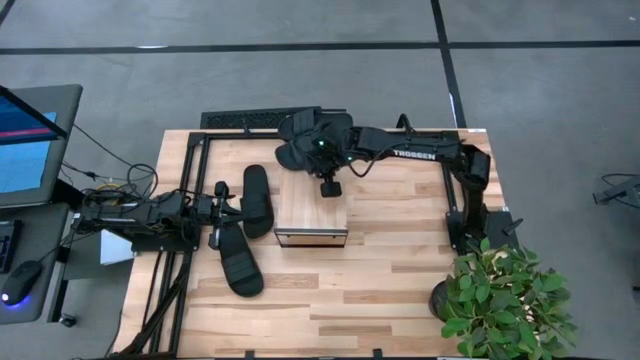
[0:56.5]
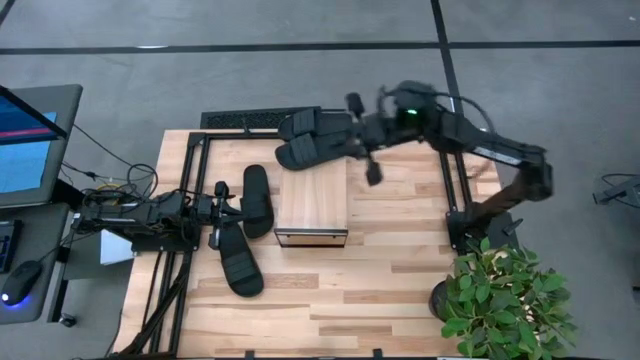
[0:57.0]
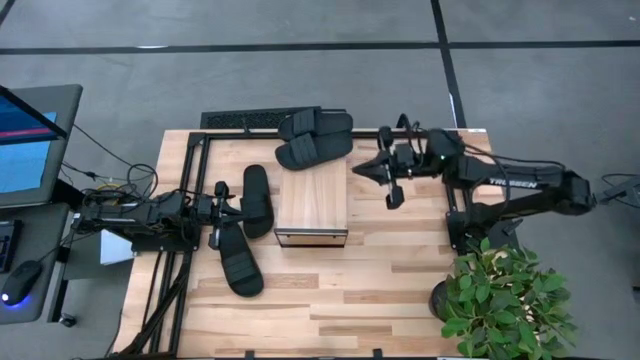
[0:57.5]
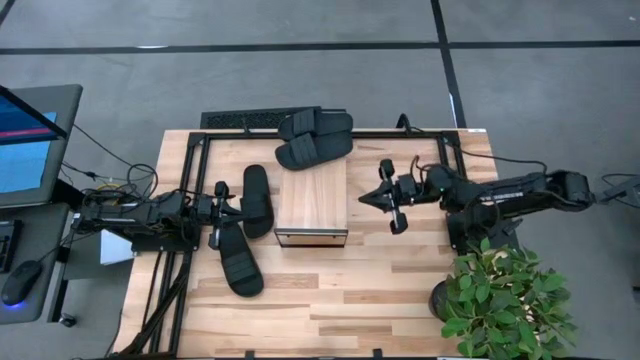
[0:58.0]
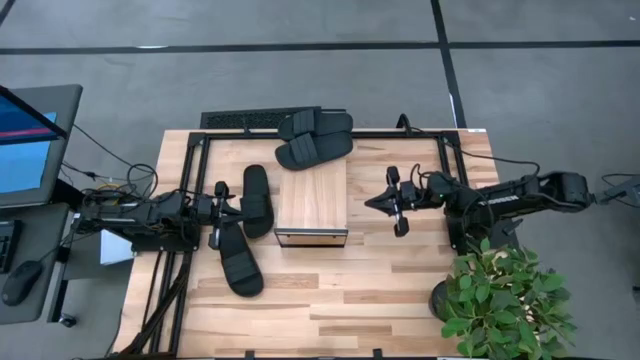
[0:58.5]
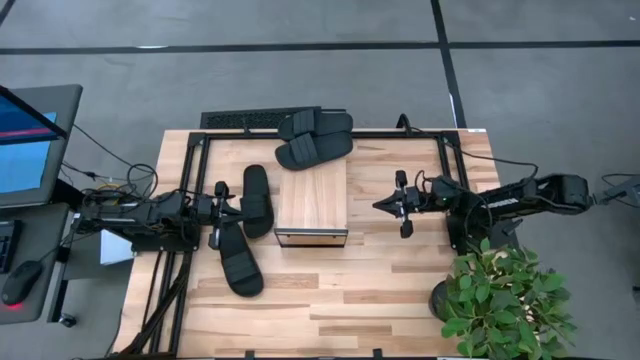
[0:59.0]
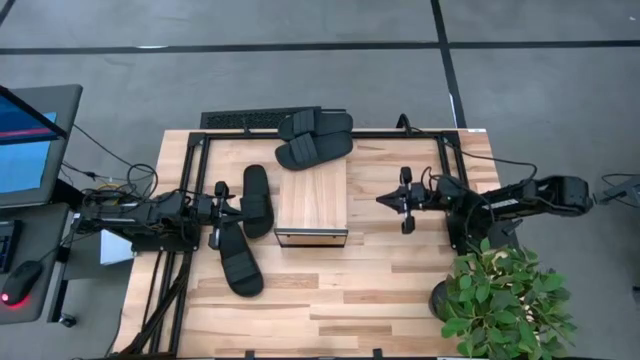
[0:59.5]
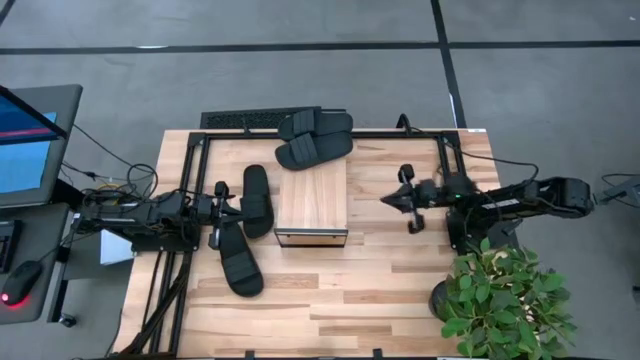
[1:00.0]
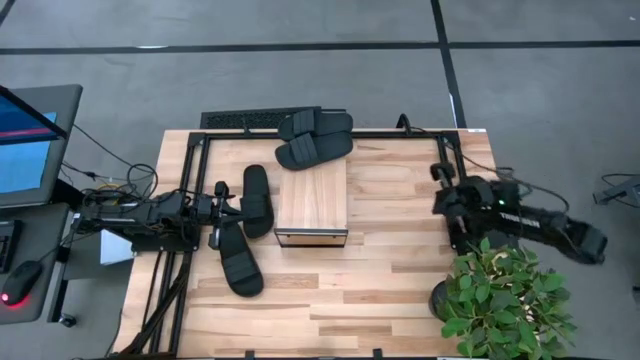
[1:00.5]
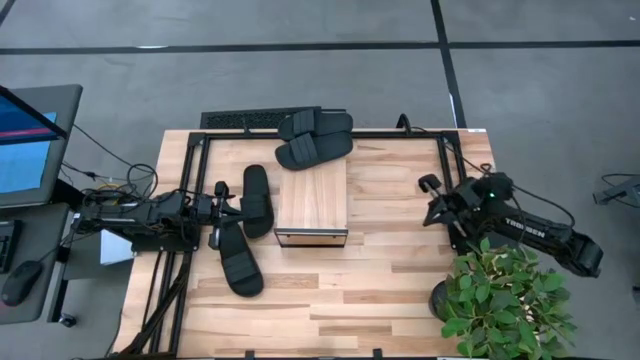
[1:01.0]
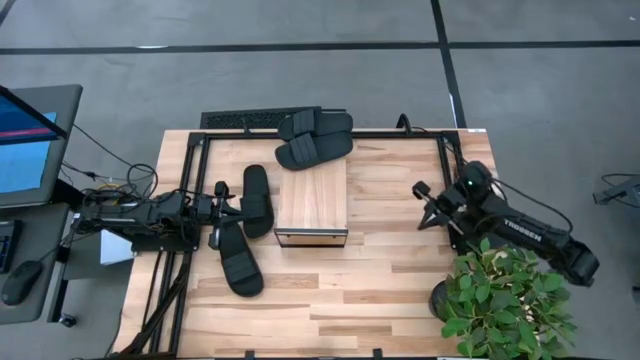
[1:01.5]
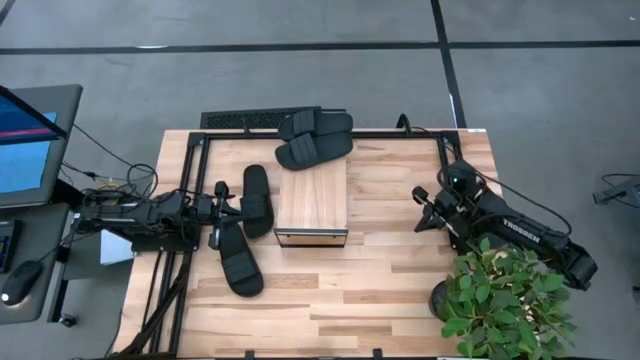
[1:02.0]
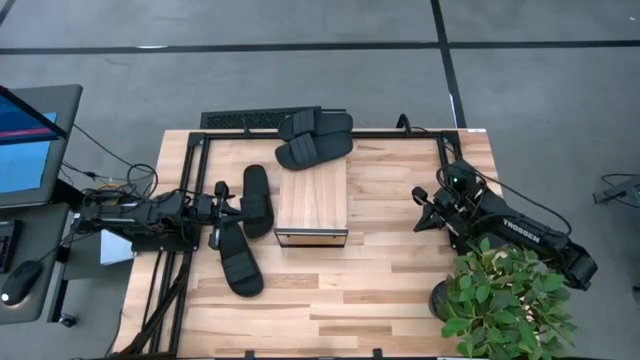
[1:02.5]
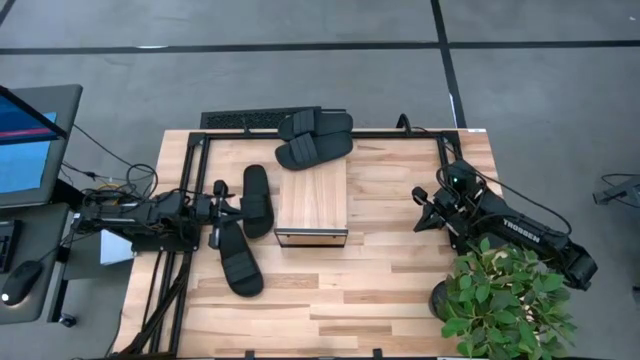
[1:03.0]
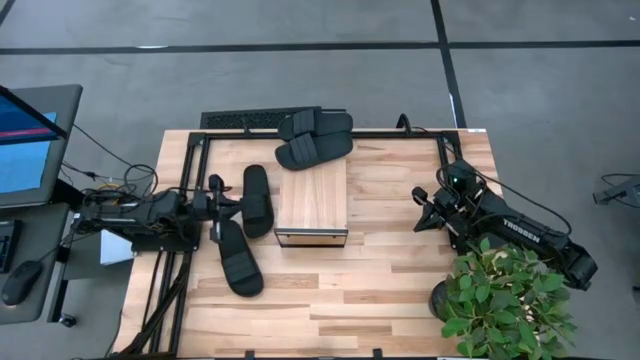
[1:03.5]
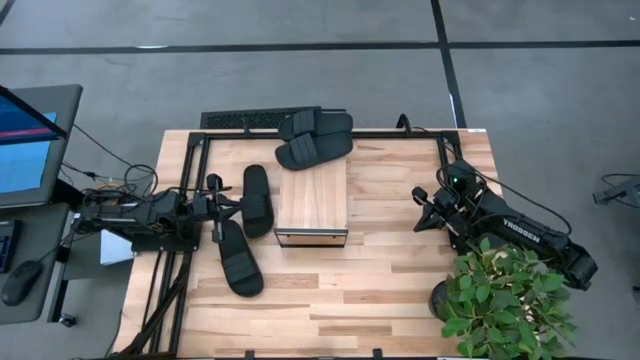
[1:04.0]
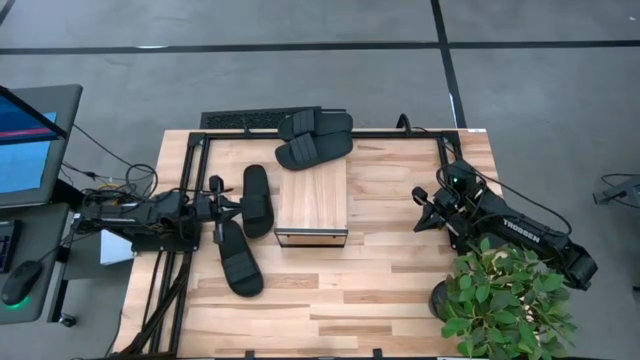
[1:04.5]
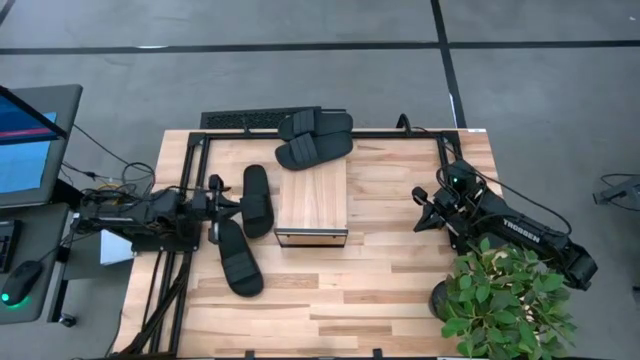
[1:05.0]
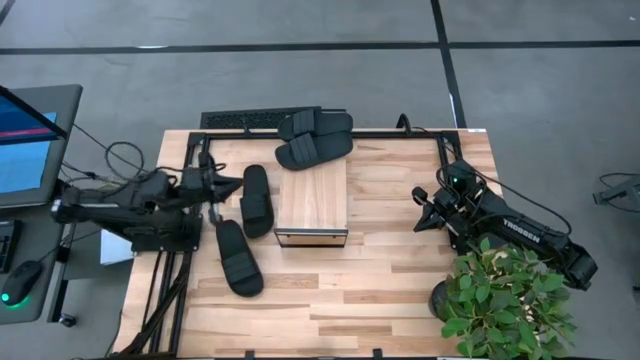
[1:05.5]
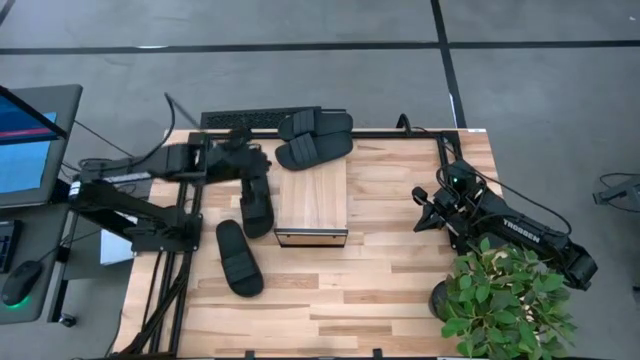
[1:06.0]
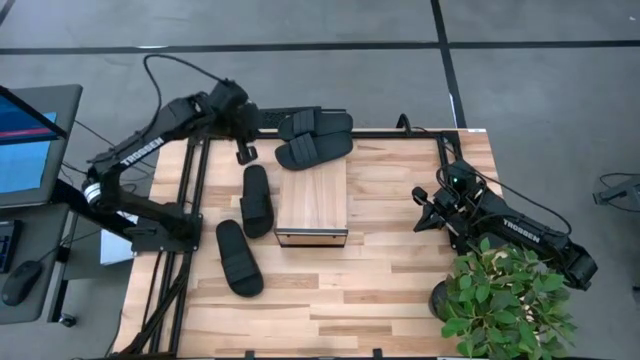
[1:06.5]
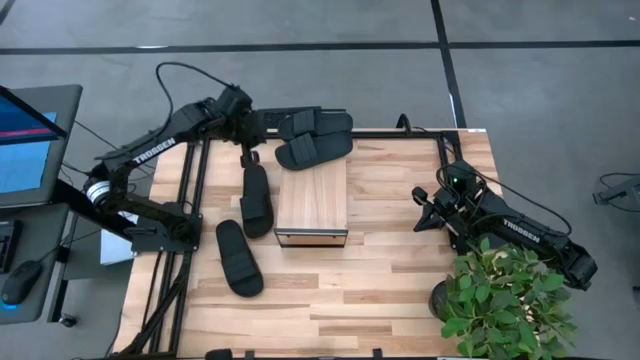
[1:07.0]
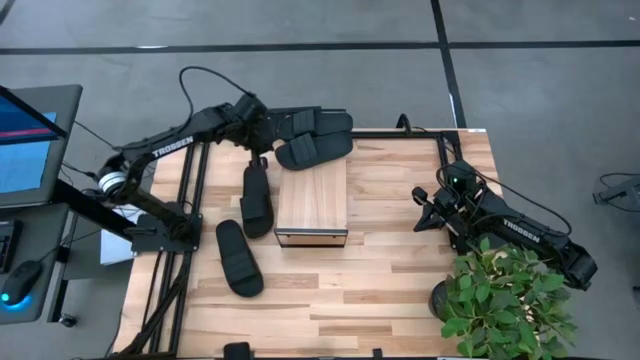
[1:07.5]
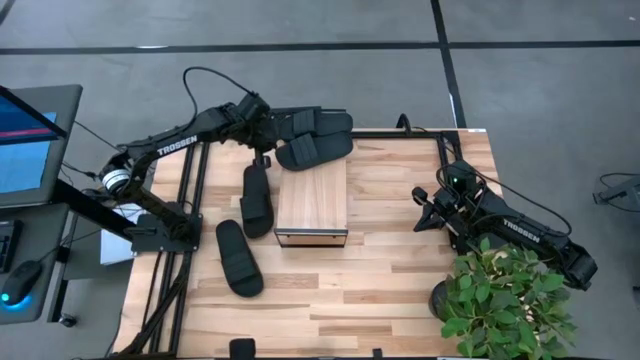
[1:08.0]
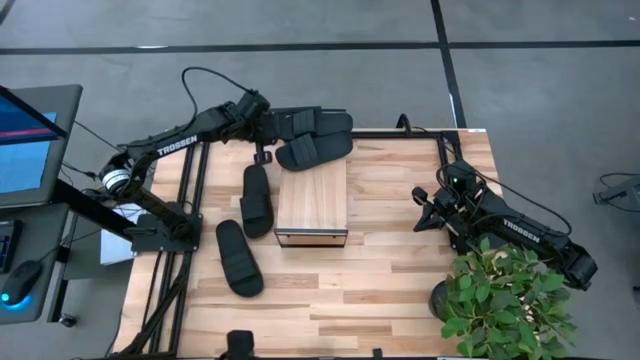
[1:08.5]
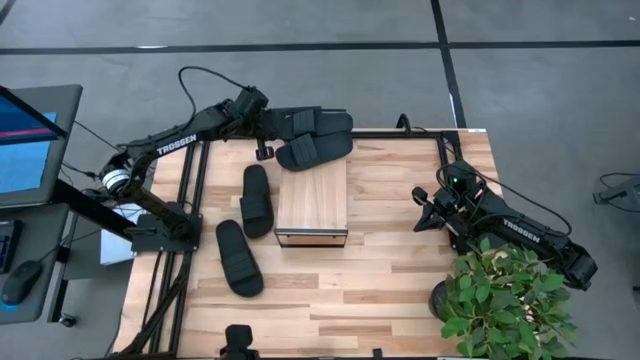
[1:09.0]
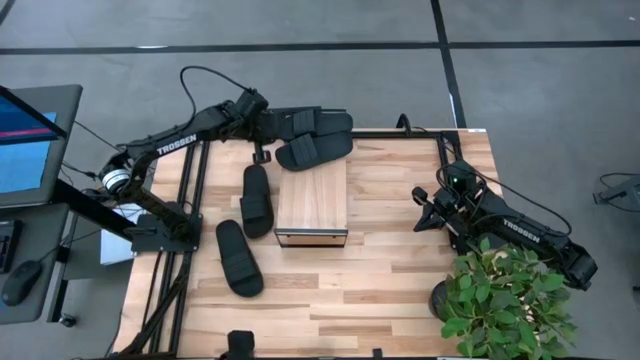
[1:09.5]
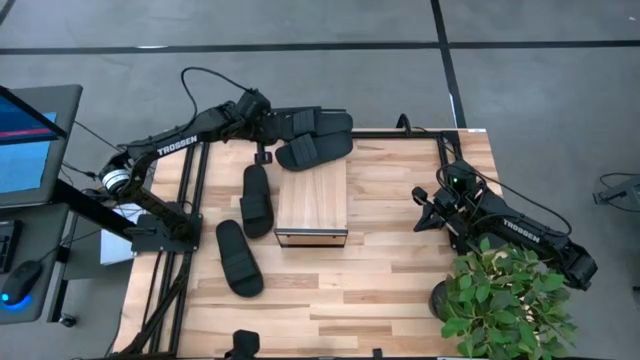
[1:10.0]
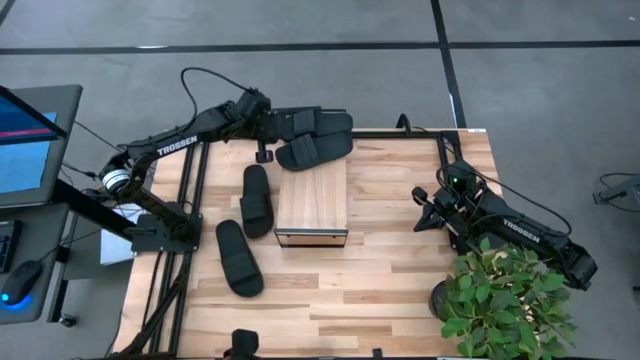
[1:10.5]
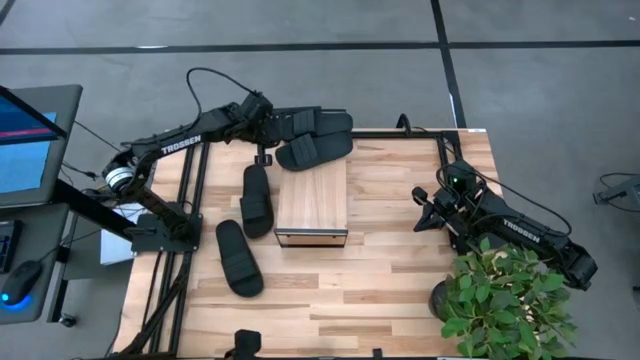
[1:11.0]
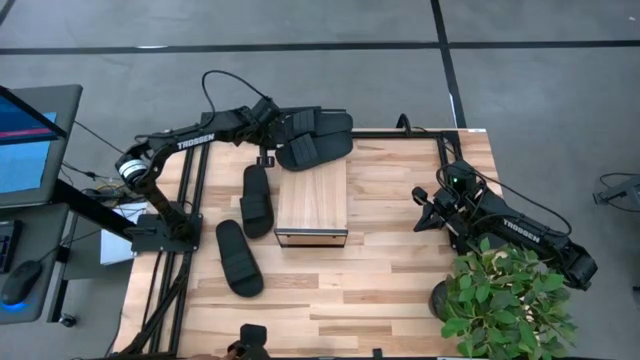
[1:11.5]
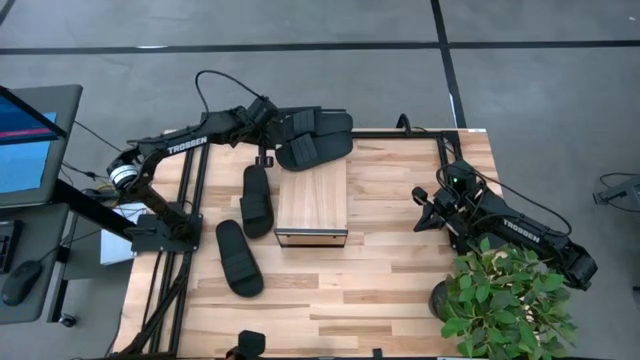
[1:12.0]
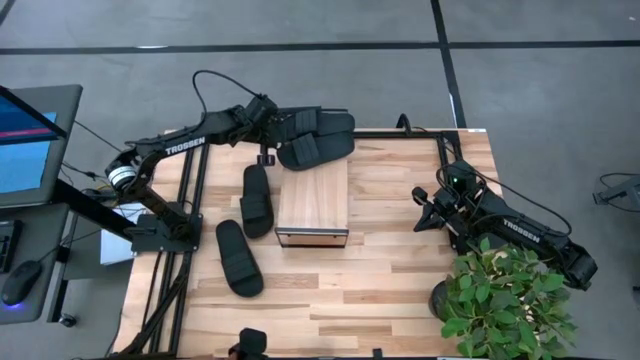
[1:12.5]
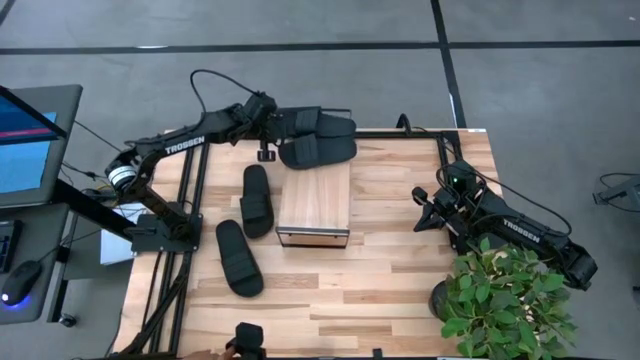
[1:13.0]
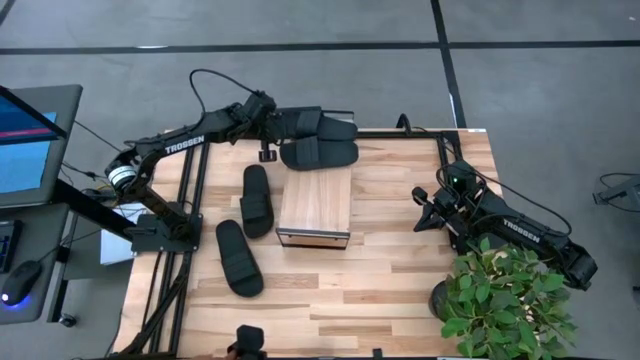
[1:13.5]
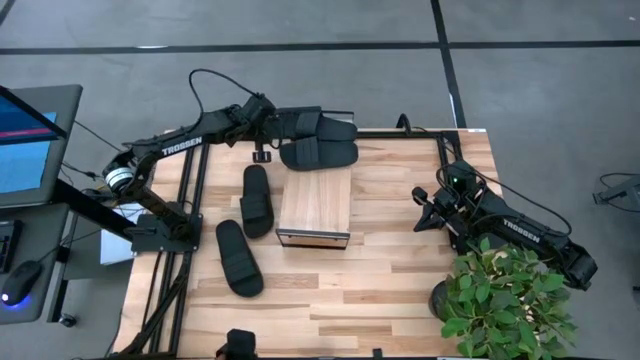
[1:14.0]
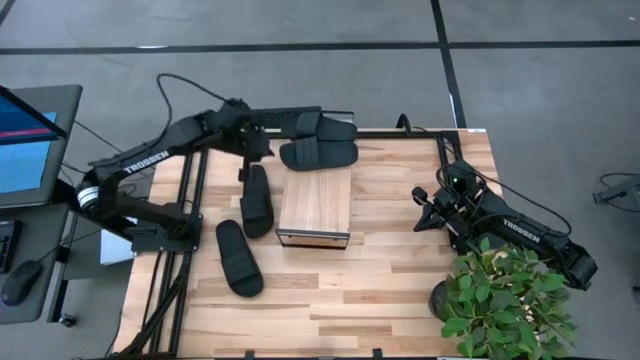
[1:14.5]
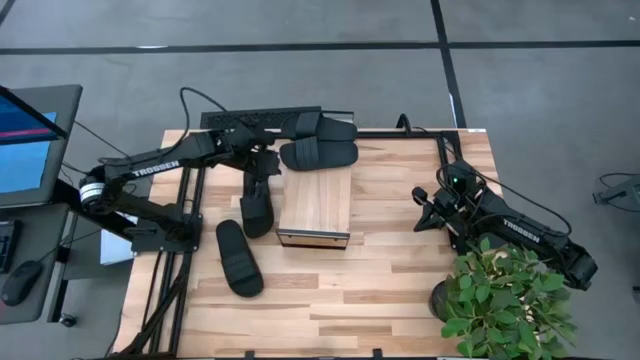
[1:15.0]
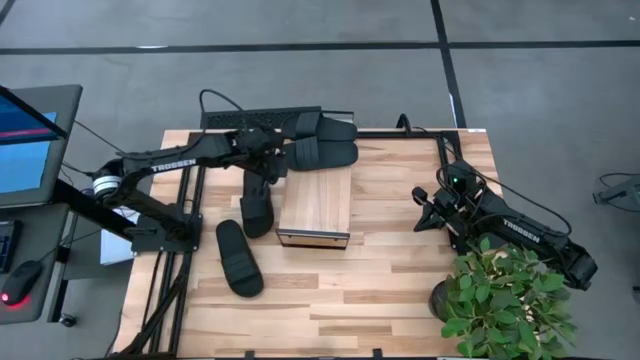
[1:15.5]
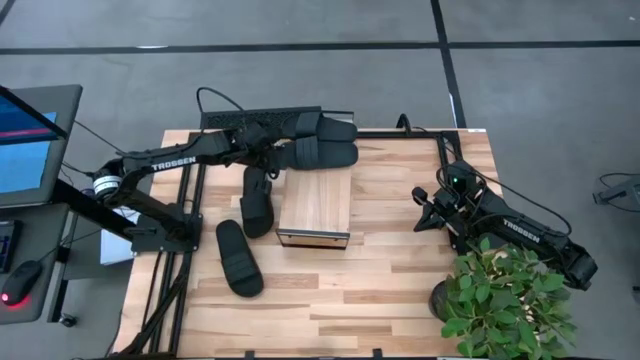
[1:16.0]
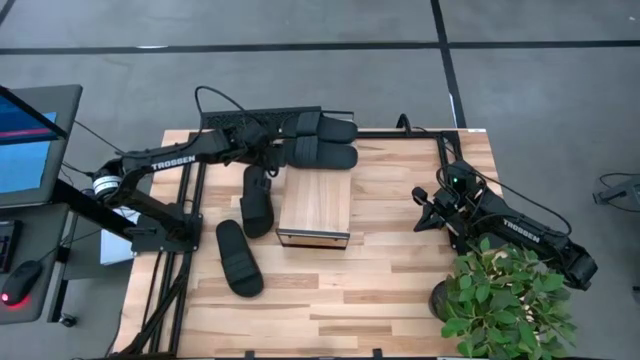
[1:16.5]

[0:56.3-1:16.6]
Task: Pick and place slides into the shelf
Adjust the black slides on the shelf
